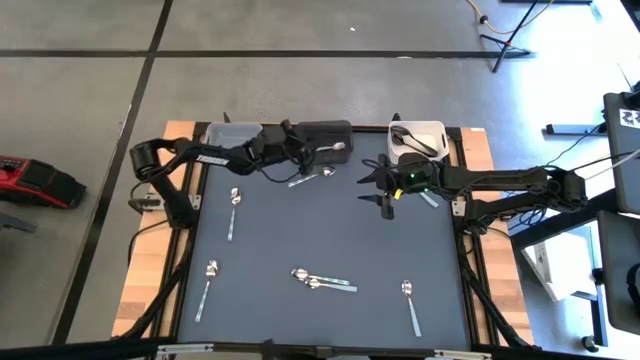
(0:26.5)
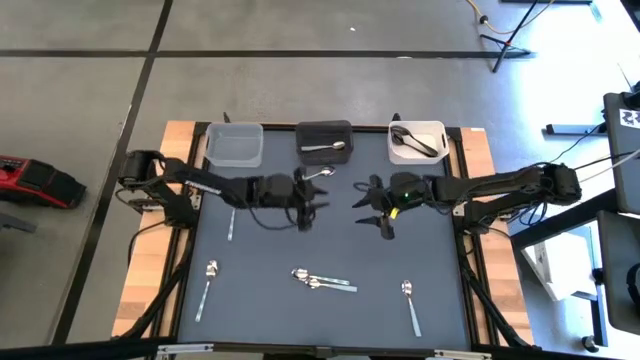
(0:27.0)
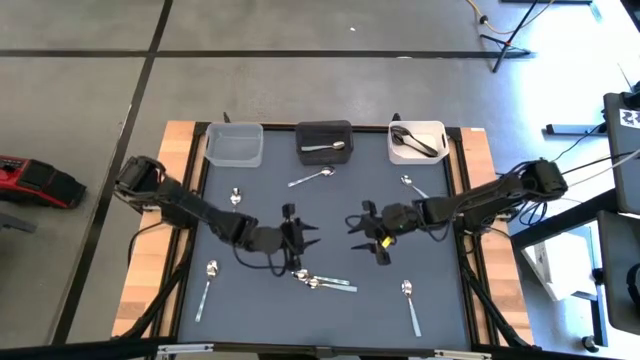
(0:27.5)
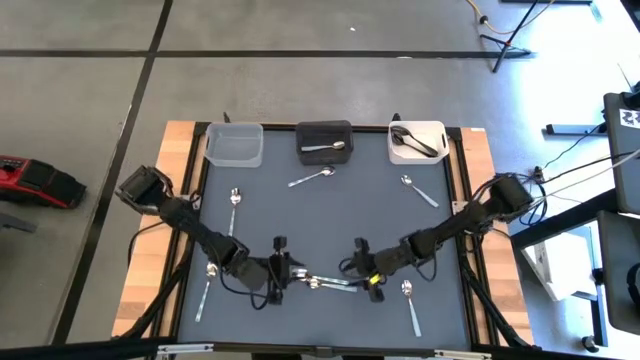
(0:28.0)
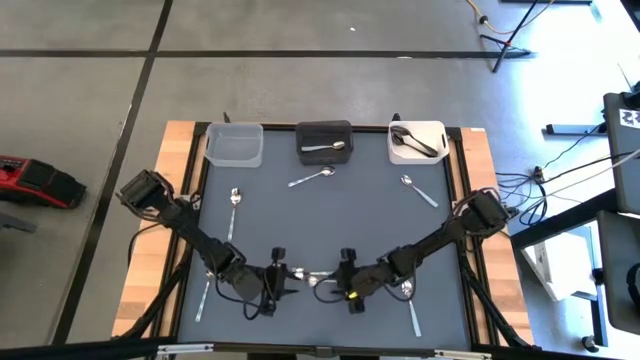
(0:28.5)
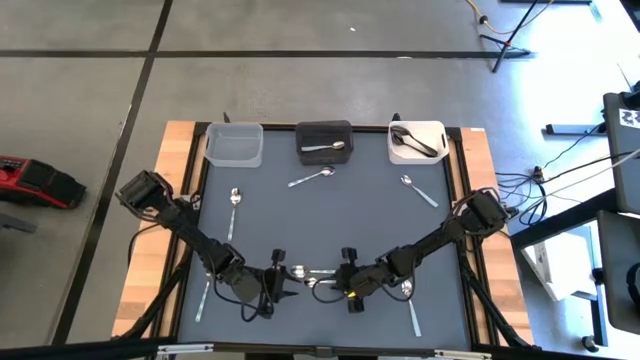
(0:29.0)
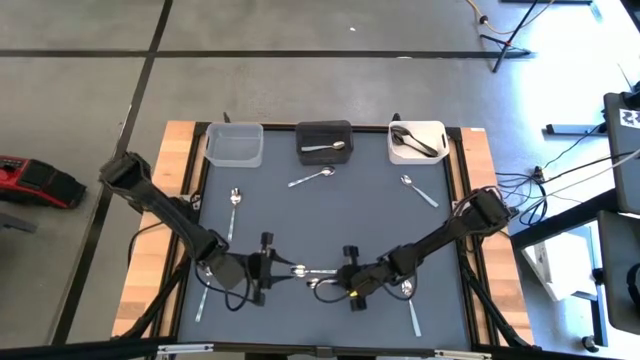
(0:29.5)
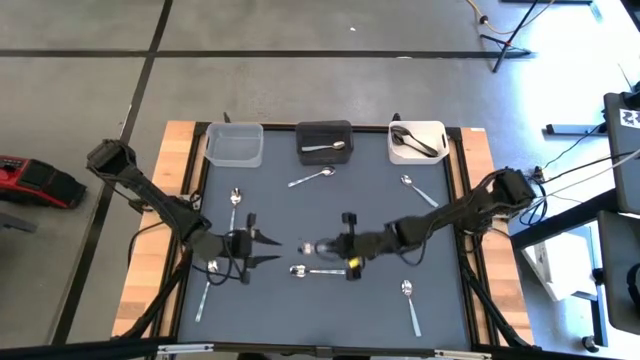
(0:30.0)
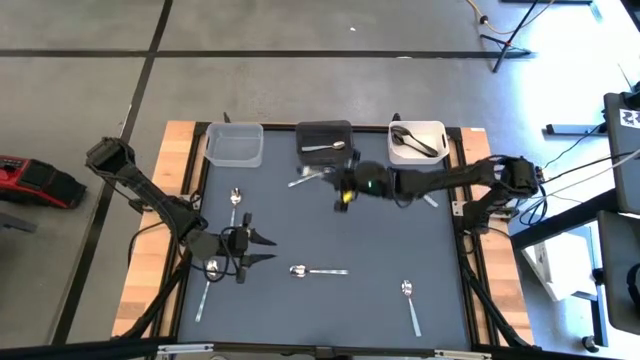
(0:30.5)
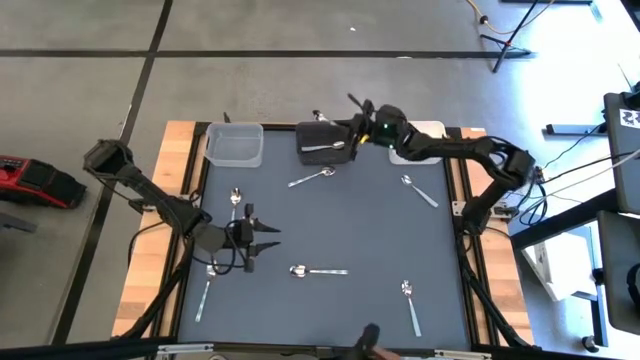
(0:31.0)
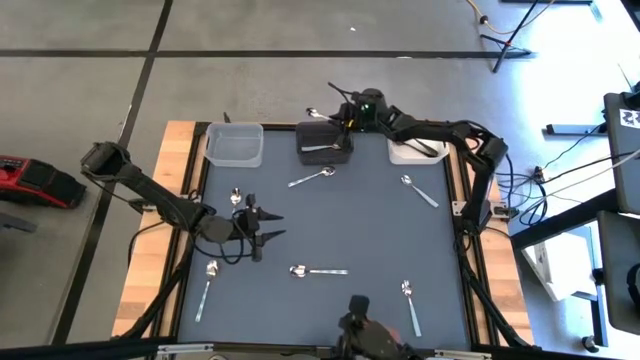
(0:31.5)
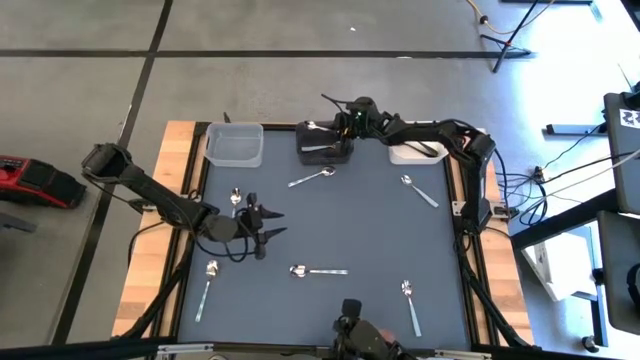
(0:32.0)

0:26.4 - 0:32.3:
Task: Sort silverware by color (type)
Put the blue spoon into the black bin

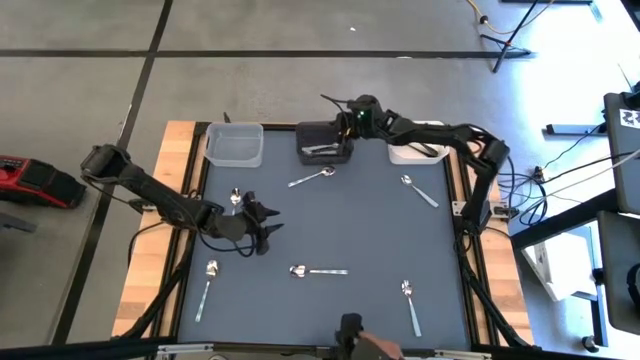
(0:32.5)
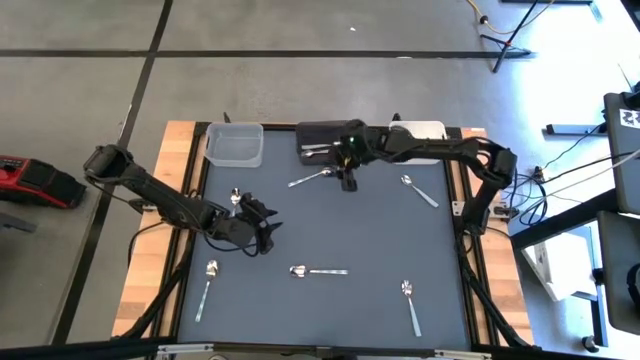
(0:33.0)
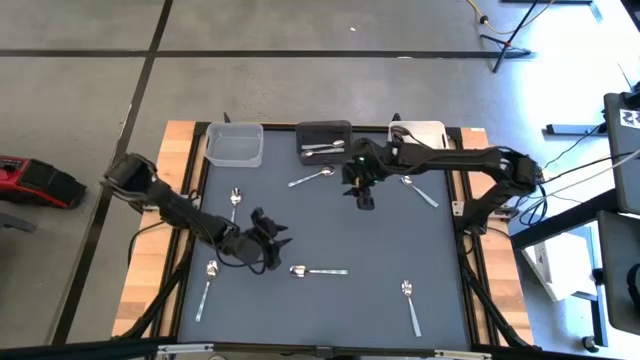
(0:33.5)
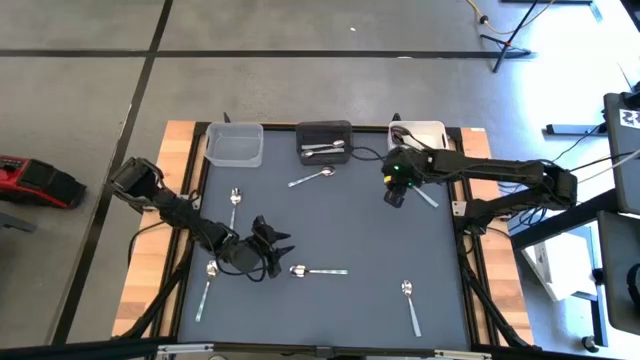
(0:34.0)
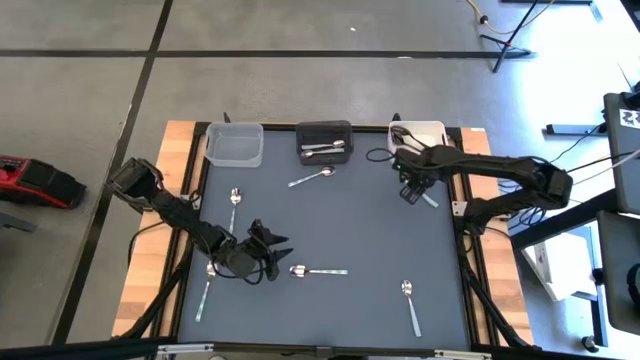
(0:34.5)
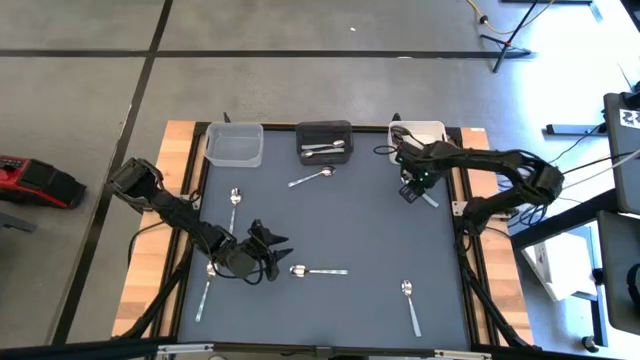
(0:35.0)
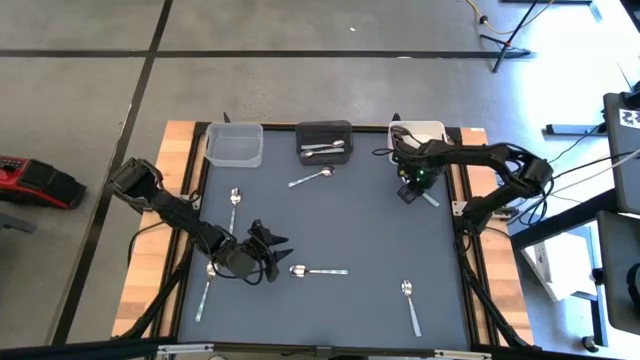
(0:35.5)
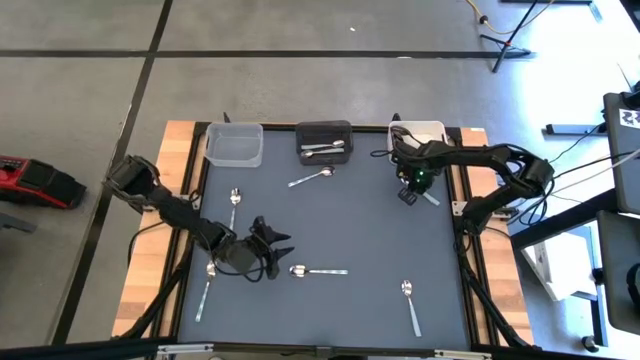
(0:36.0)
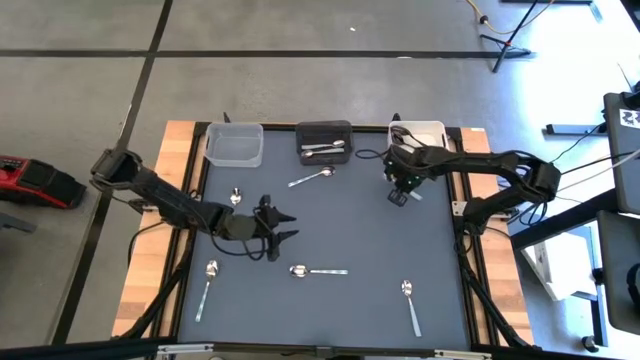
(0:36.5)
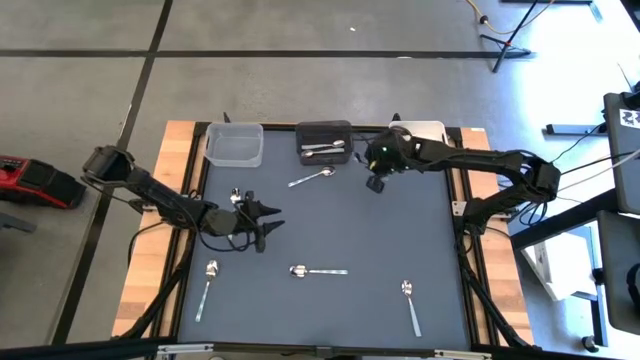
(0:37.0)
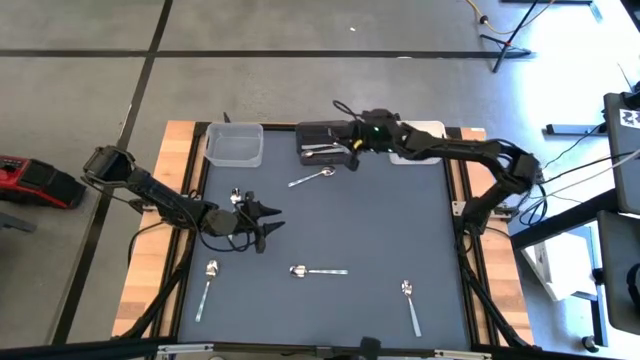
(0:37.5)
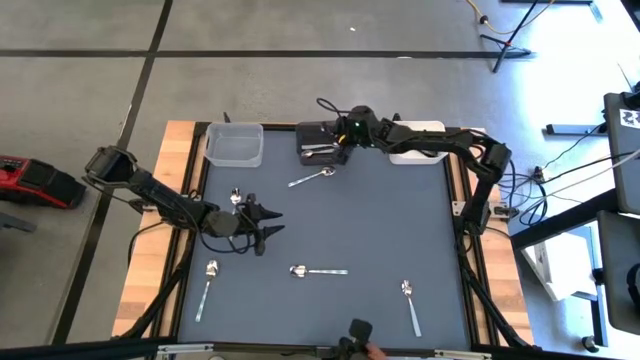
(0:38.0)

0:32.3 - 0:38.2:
Put the blue spoon into the black bin

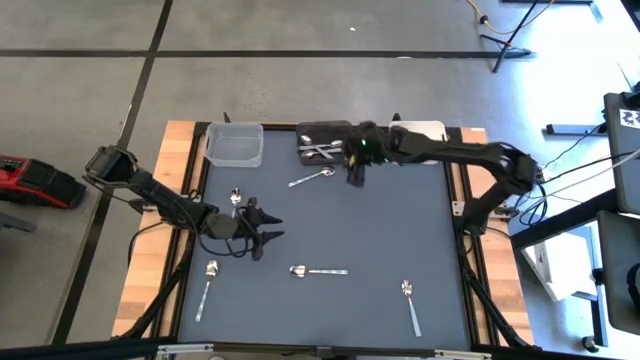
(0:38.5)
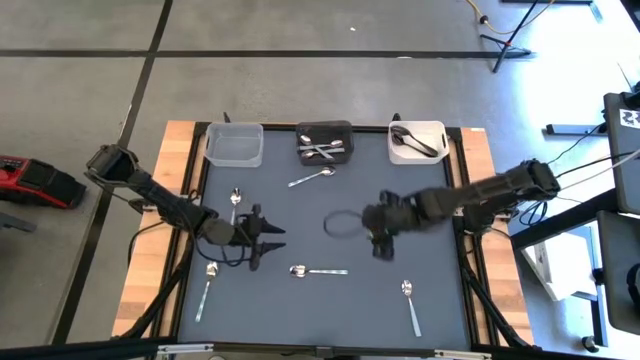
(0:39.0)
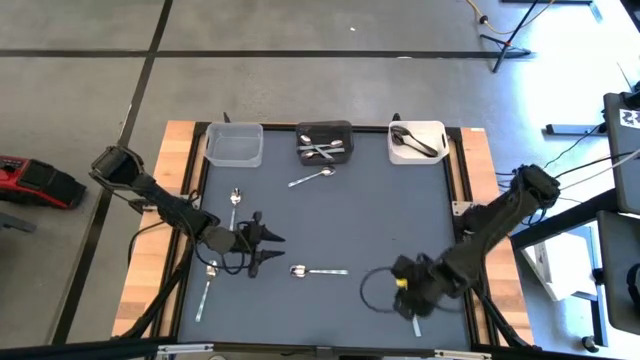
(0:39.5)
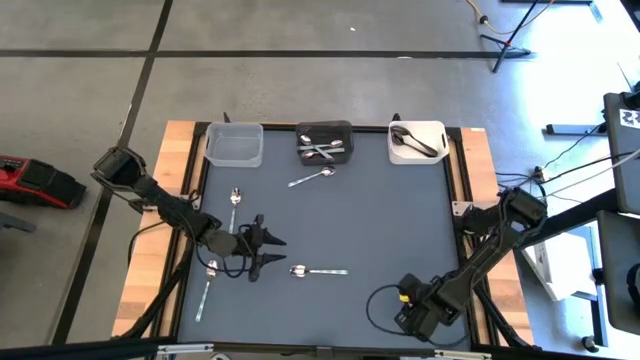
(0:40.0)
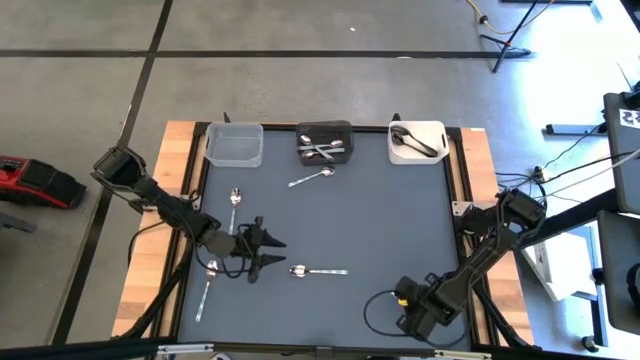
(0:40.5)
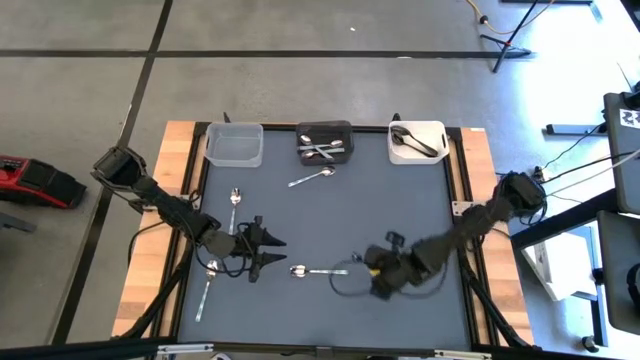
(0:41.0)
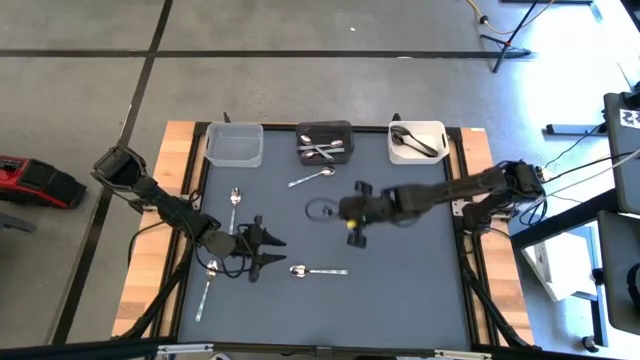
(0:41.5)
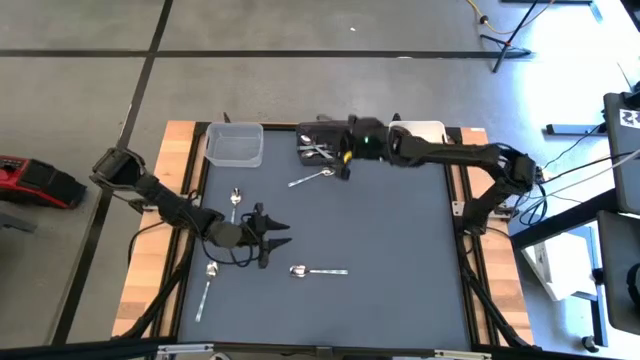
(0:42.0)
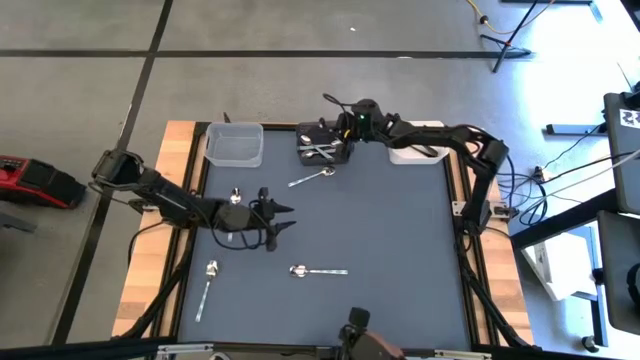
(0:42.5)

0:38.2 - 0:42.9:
Put the blue spoon into the black bin

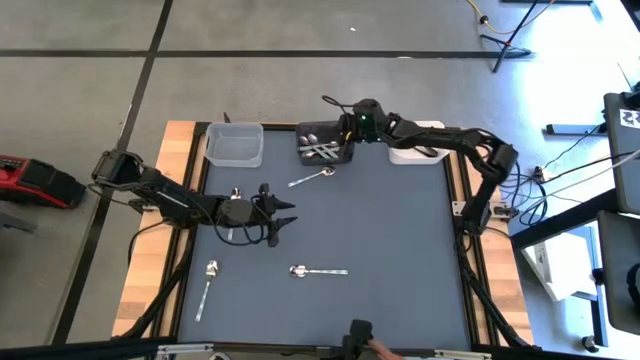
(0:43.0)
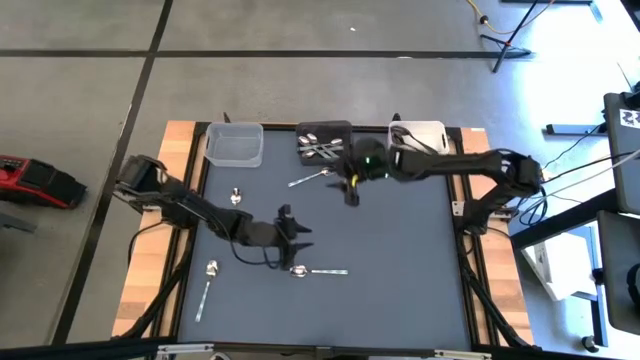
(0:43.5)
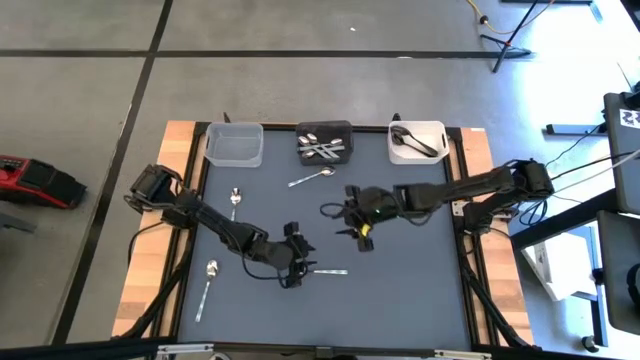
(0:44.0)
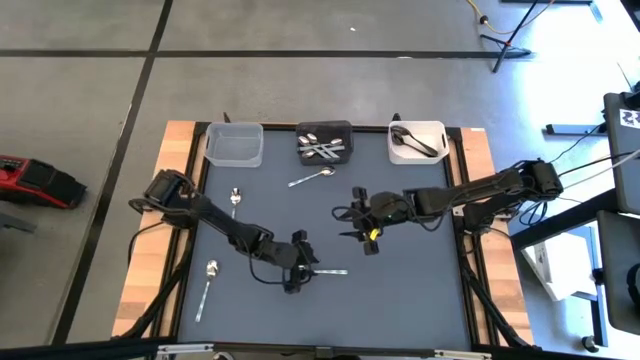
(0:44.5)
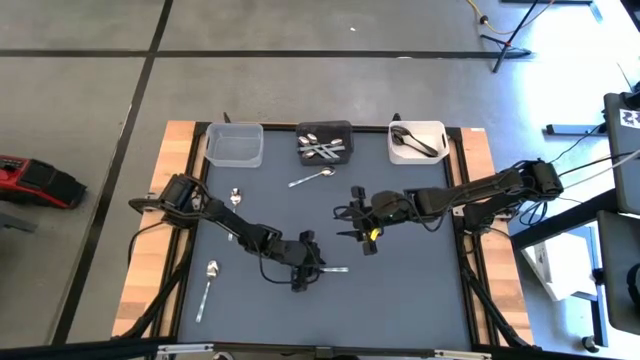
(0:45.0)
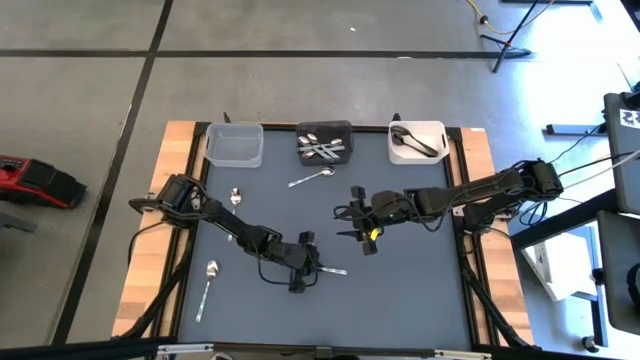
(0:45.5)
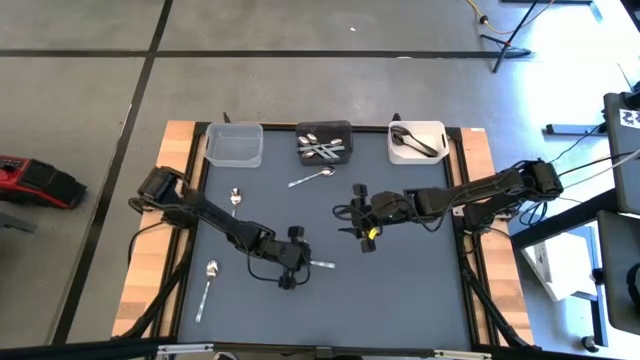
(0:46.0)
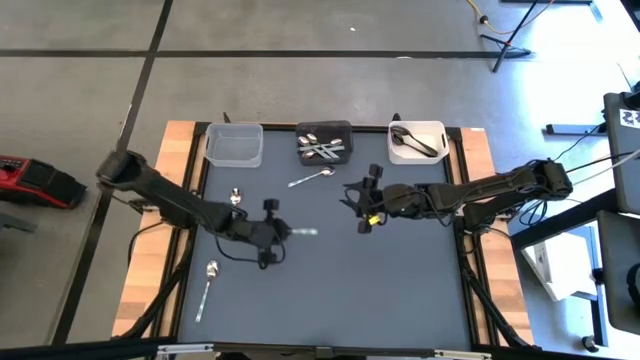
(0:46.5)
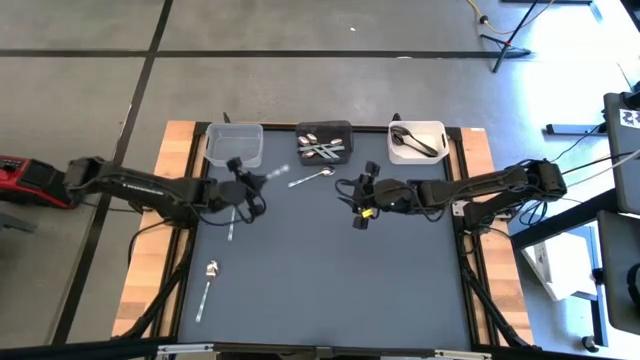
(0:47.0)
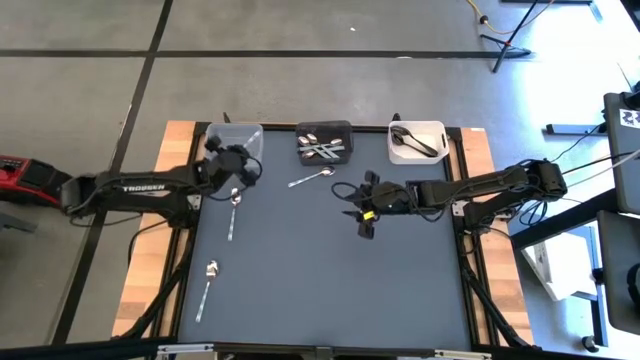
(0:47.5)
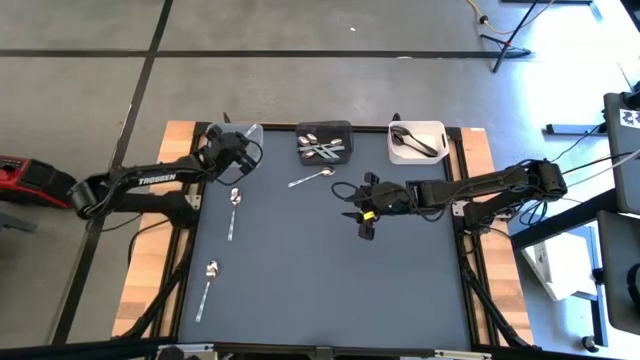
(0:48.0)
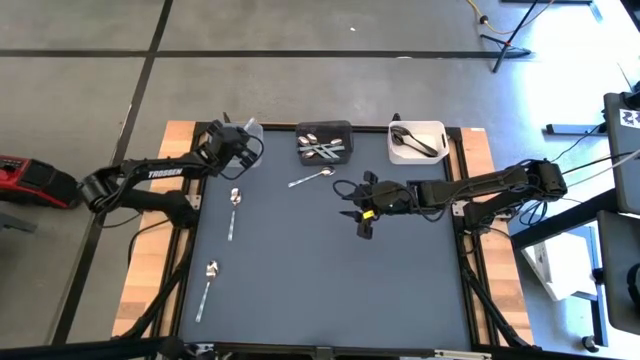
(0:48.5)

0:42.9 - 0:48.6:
Put the green spoon into the transparent bin
